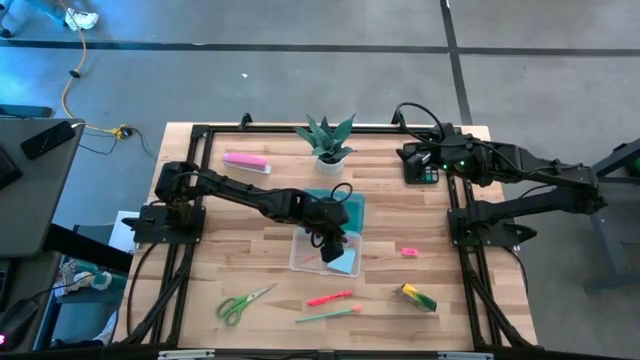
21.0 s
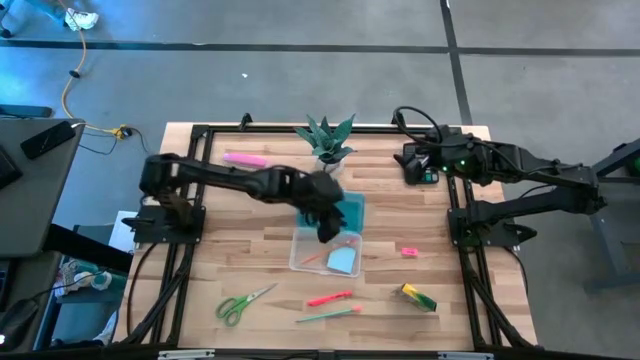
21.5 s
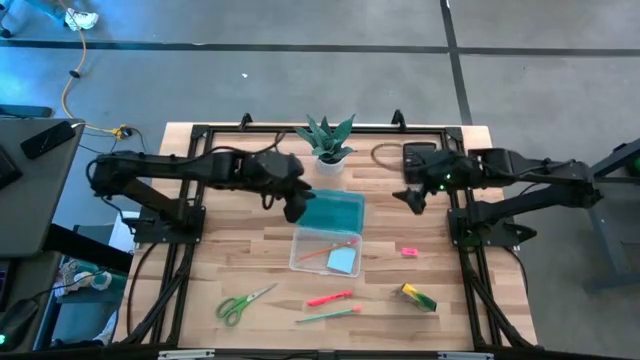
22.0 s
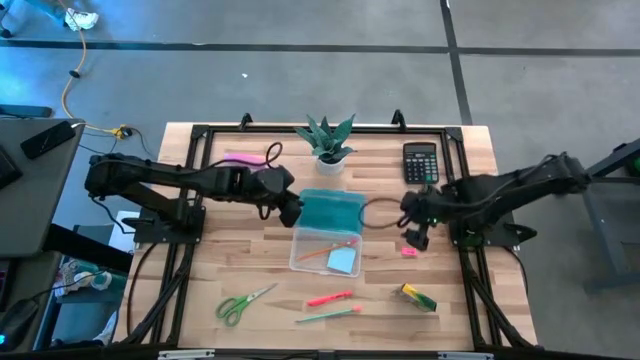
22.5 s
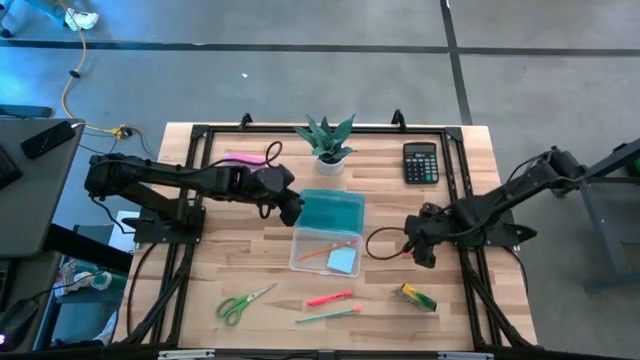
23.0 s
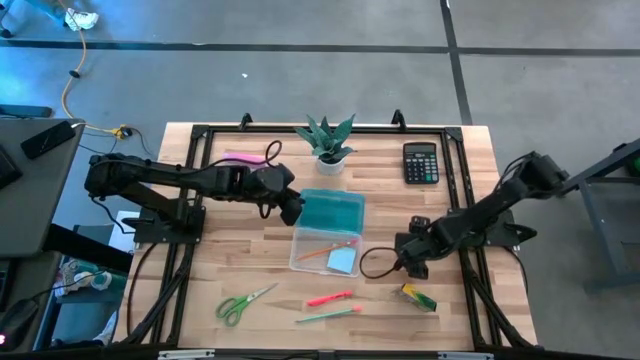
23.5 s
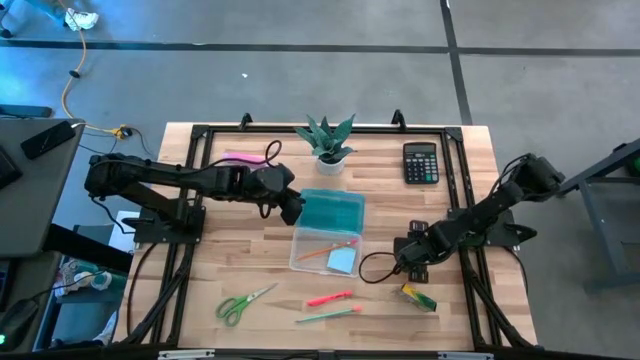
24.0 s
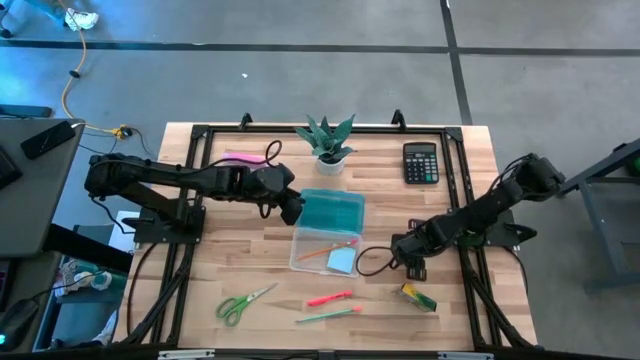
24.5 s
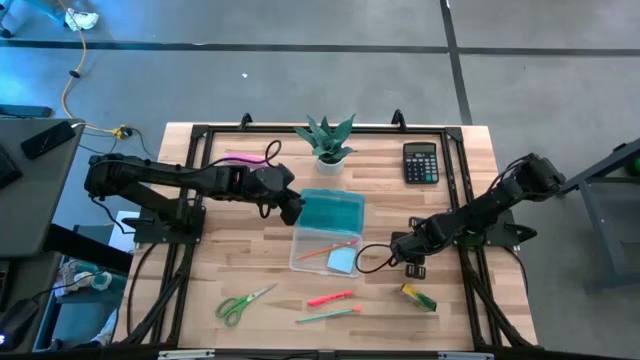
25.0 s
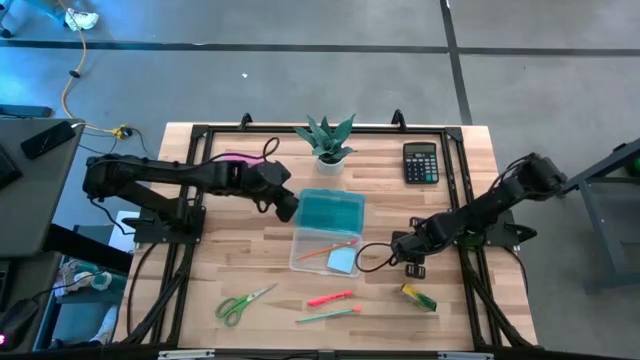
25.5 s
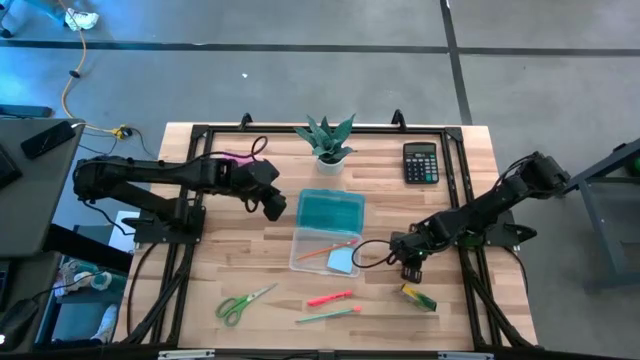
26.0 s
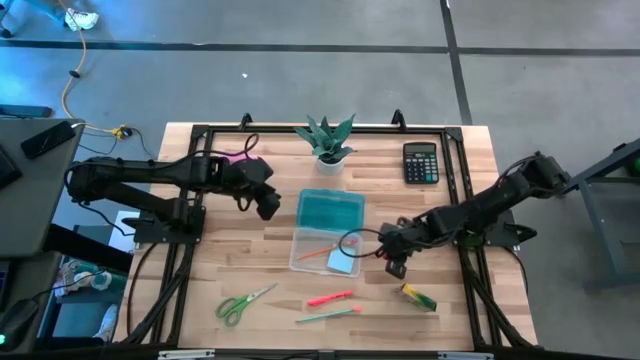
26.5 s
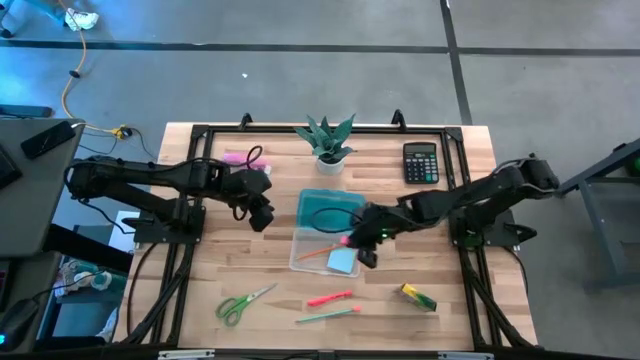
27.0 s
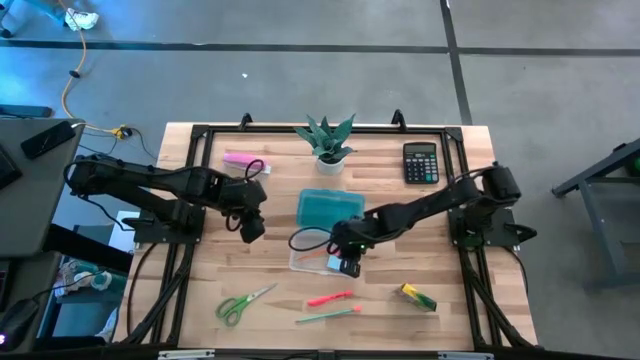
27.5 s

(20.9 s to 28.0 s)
Task: Pack school essentials
Put the pink eraser into the blue supply box

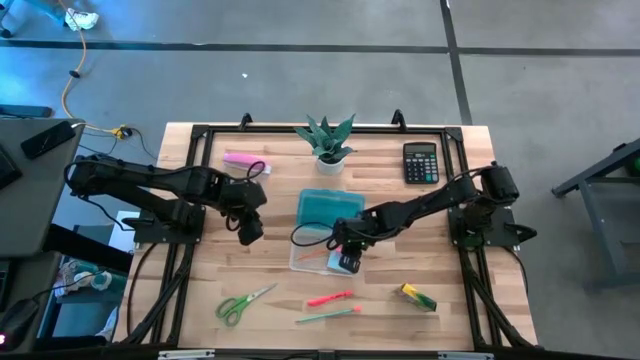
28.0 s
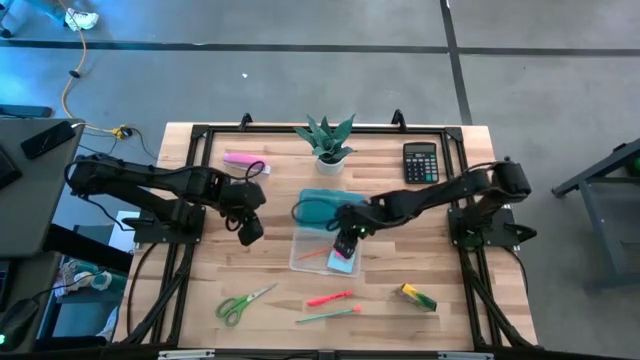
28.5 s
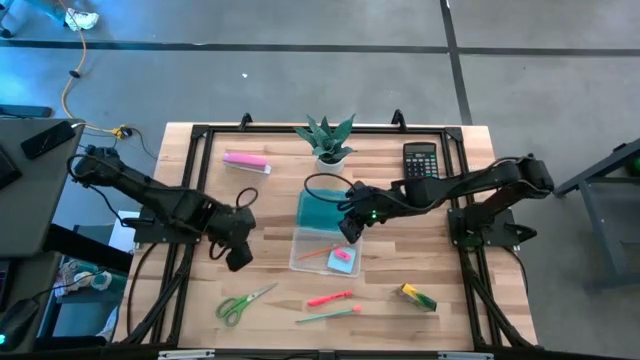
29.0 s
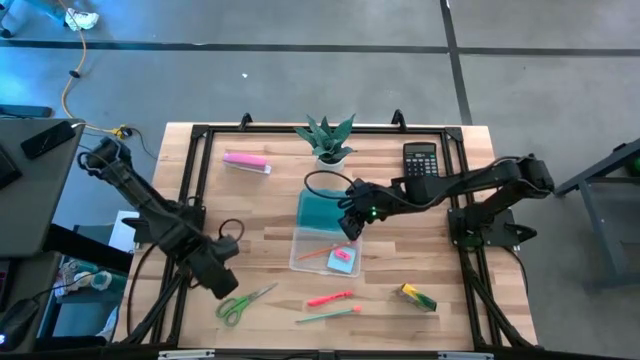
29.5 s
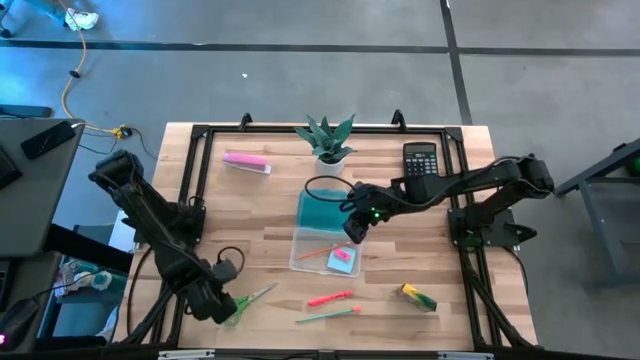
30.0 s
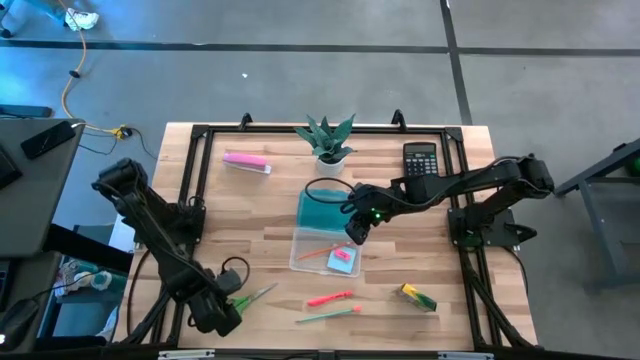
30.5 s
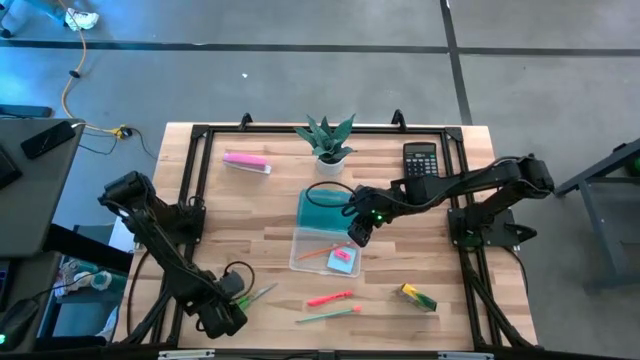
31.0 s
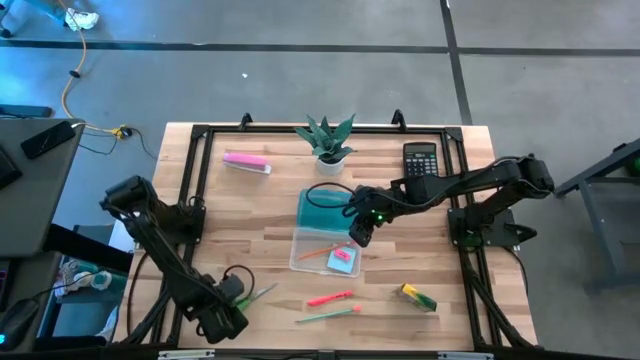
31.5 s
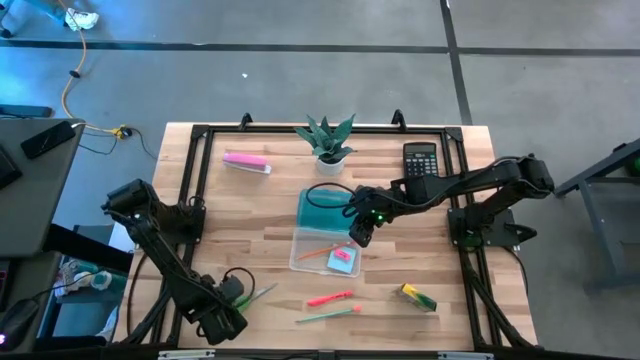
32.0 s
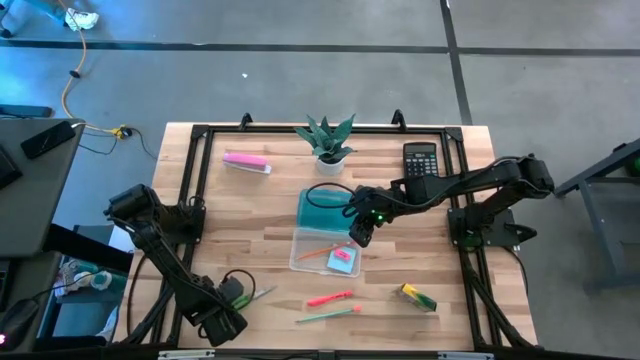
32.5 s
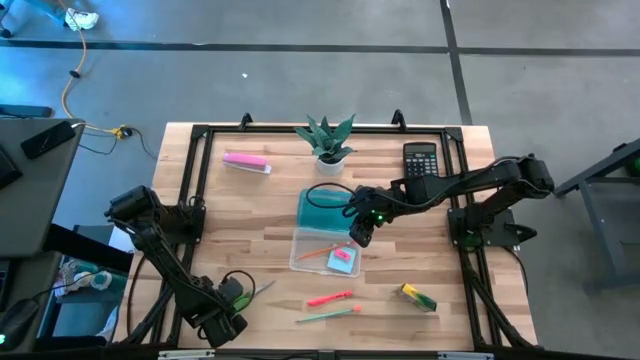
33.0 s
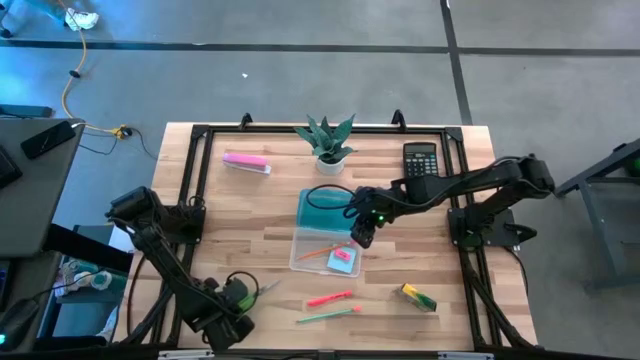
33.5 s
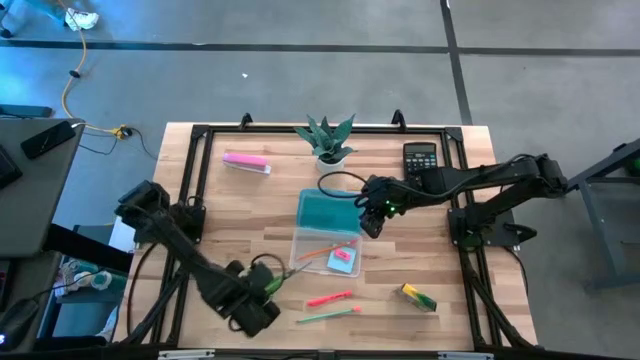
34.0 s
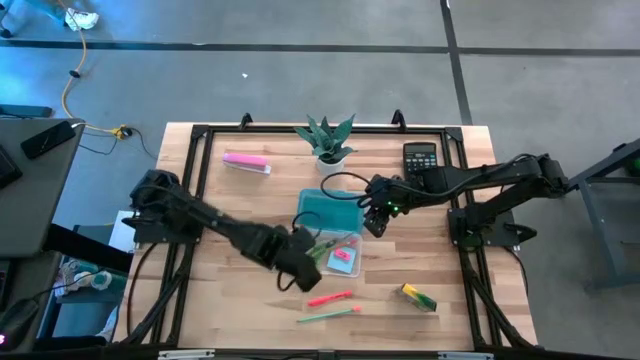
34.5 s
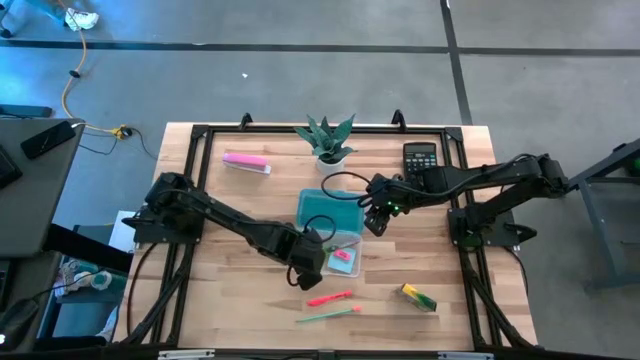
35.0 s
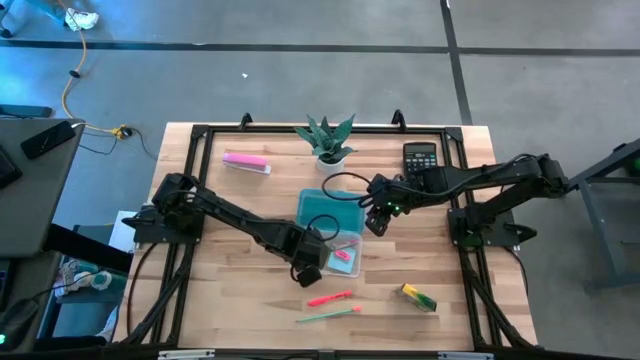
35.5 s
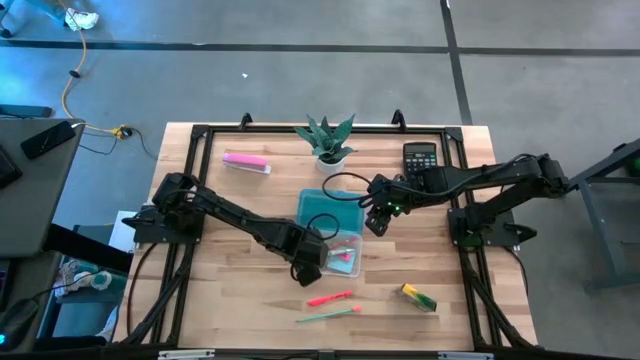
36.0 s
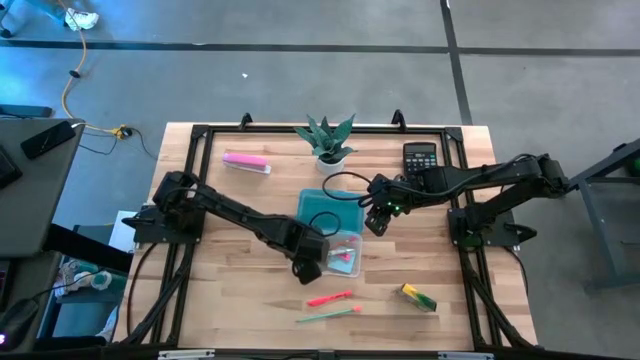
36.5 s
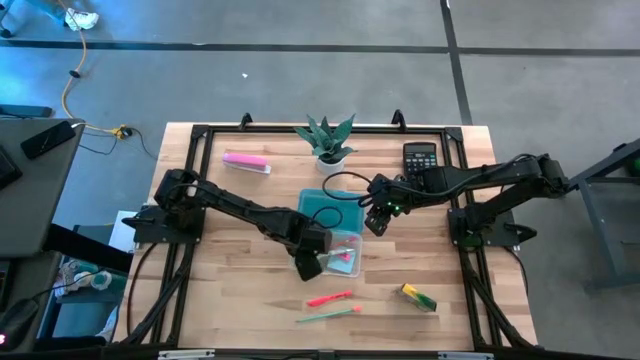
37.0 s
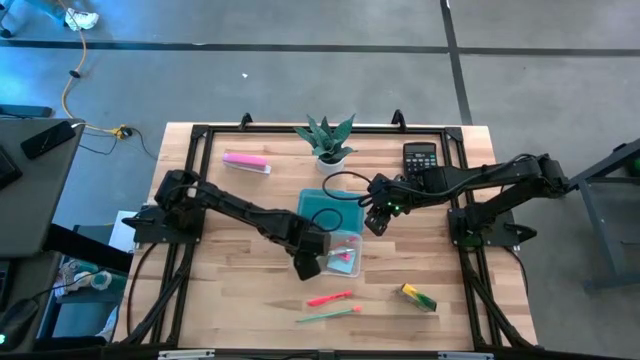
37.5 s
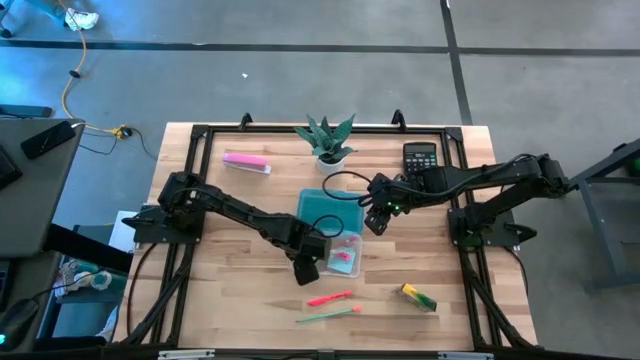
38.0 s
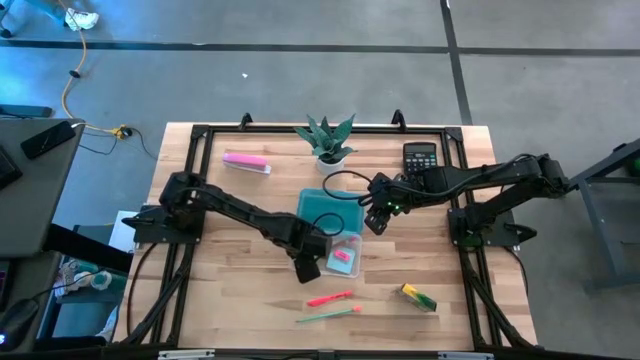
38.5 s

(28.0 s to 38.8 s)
Put the green scissors into the blue supply box

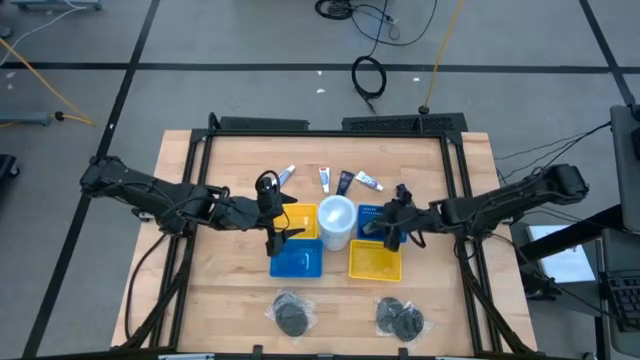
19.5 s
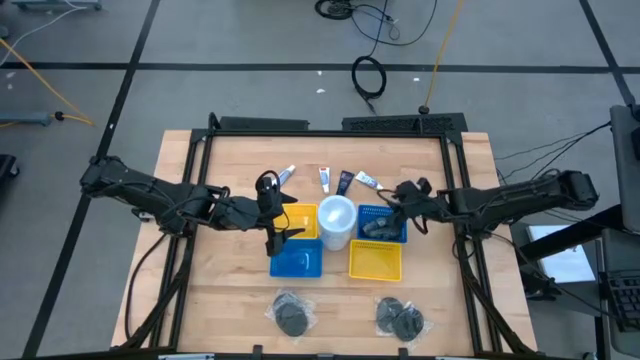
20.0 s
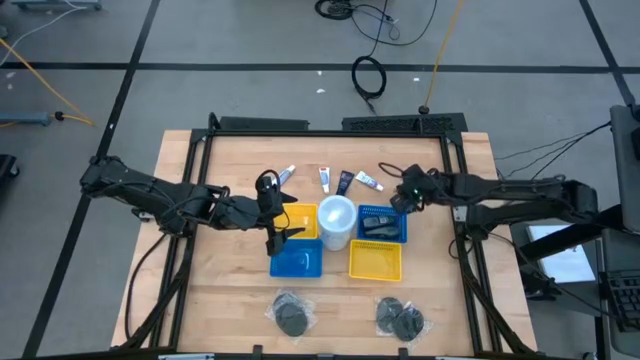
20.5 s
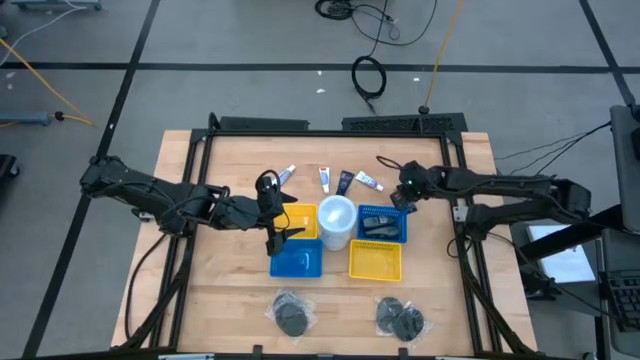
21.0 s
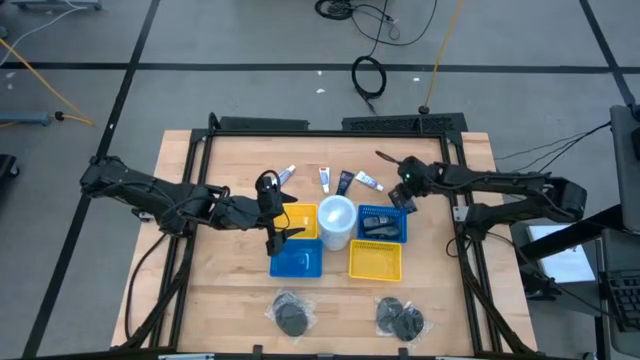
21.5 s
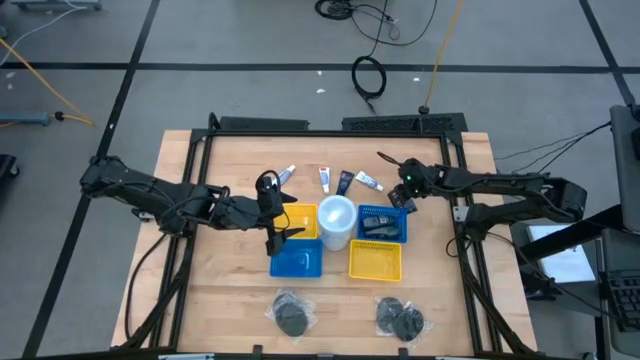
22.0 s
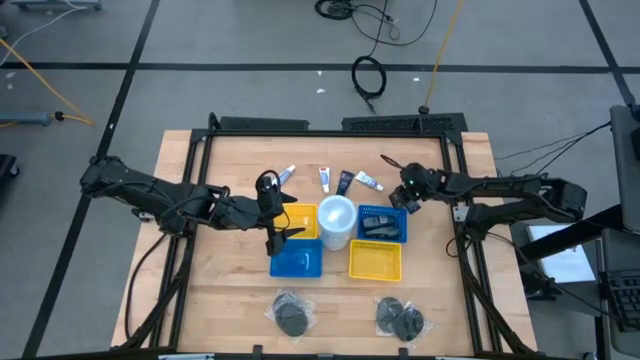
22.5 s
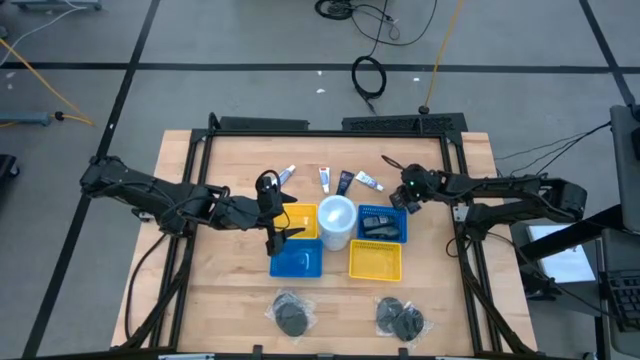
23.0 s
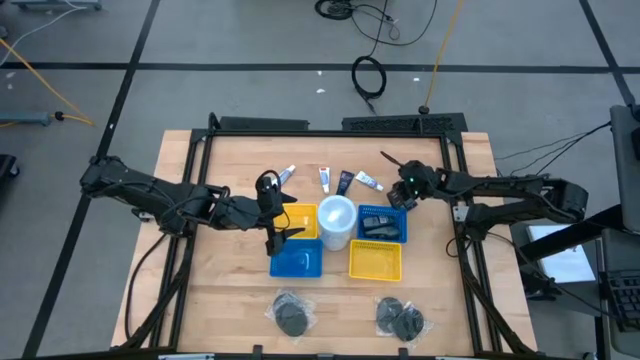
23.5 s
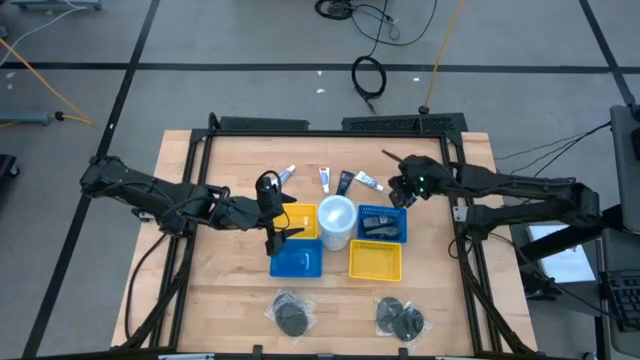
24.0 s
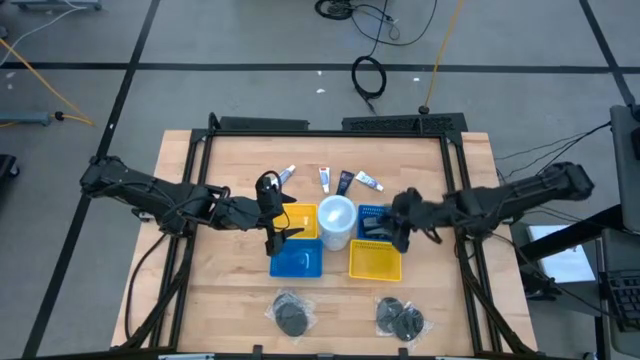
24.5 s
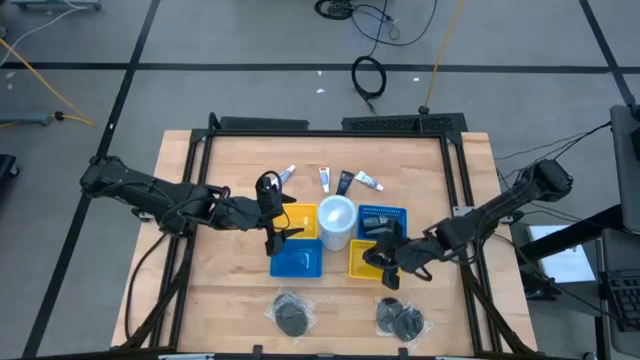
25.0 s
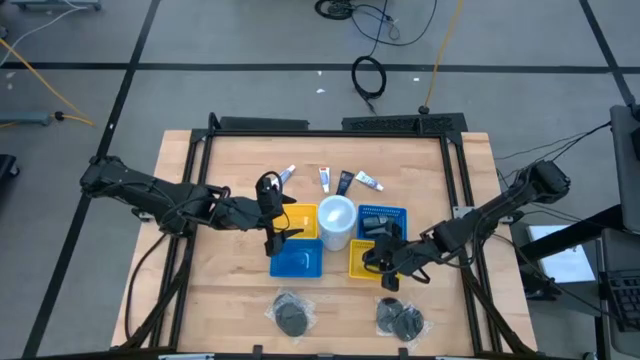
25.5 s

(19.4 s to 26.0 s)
Task: Pick & Place Travel size toiletries
Put the blue shave cream into the bottom yellow bin
